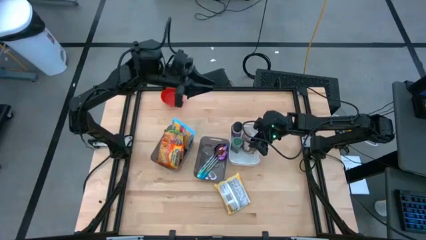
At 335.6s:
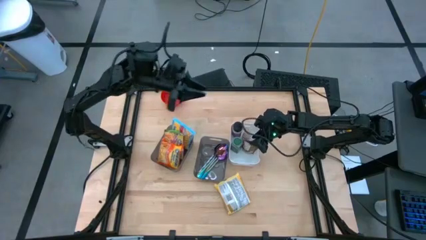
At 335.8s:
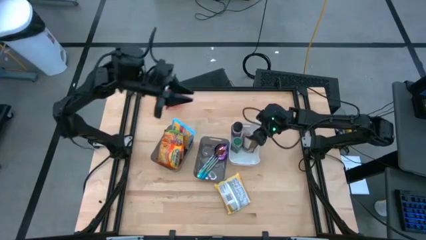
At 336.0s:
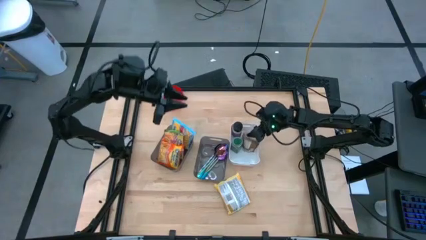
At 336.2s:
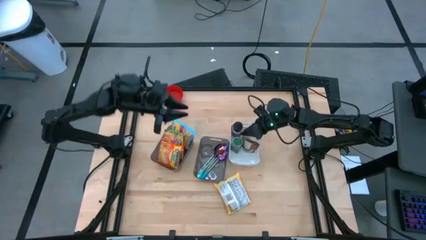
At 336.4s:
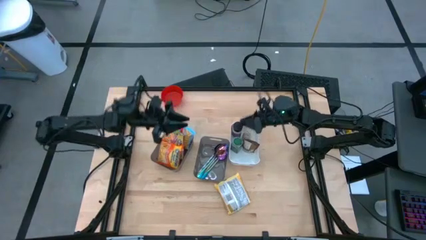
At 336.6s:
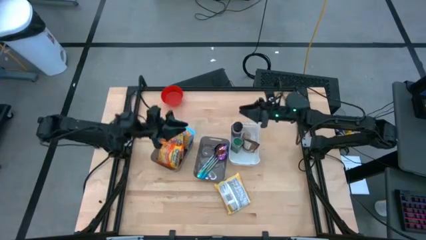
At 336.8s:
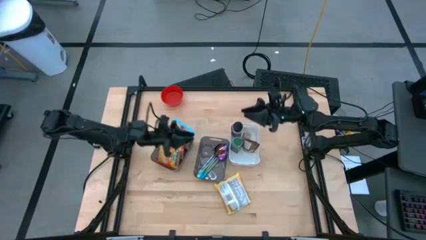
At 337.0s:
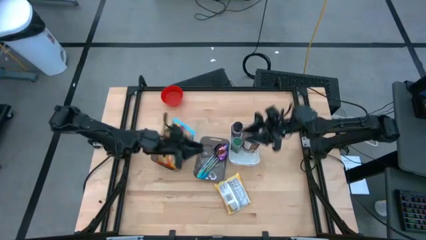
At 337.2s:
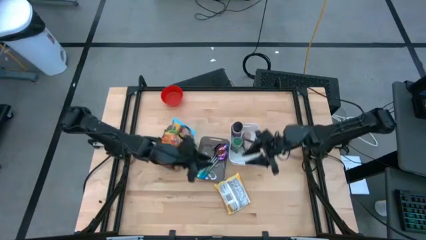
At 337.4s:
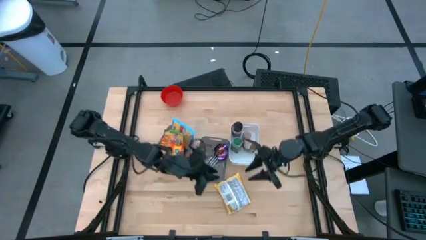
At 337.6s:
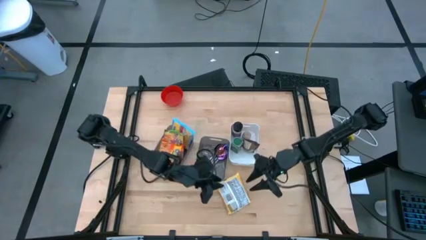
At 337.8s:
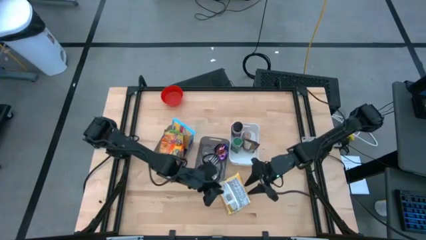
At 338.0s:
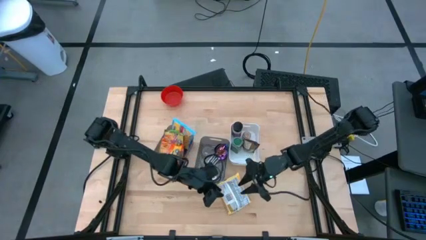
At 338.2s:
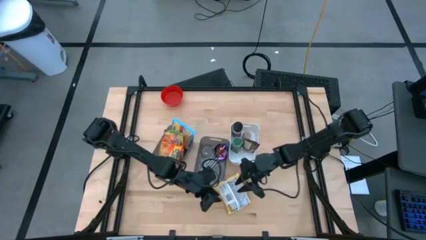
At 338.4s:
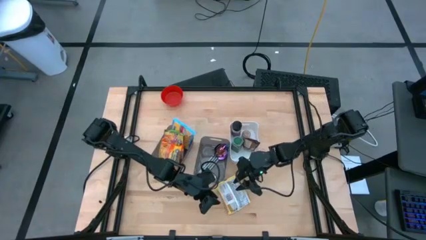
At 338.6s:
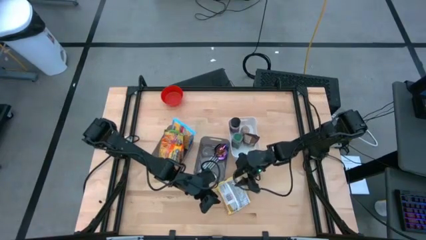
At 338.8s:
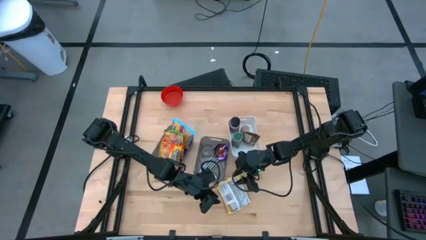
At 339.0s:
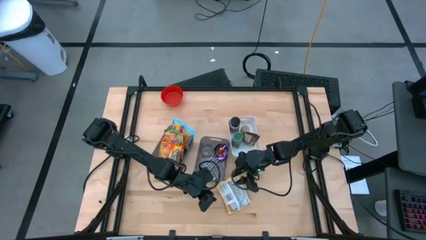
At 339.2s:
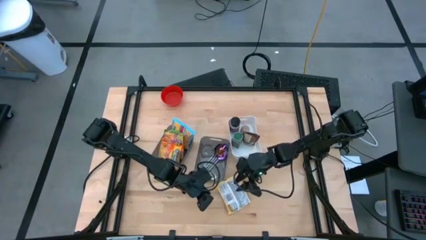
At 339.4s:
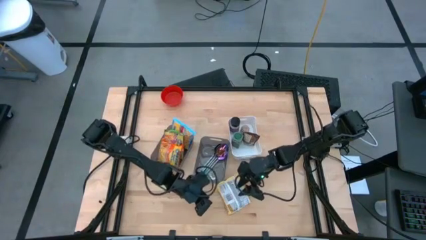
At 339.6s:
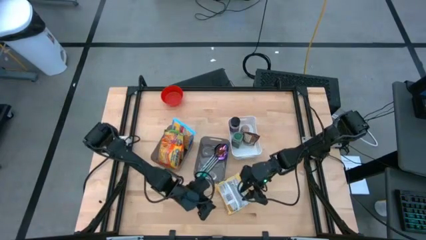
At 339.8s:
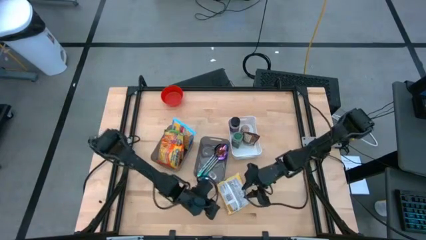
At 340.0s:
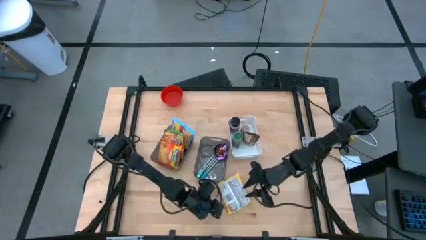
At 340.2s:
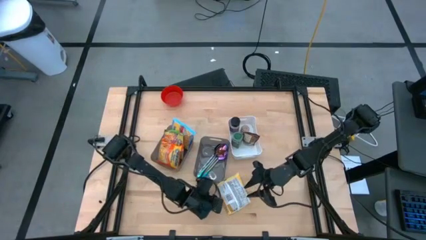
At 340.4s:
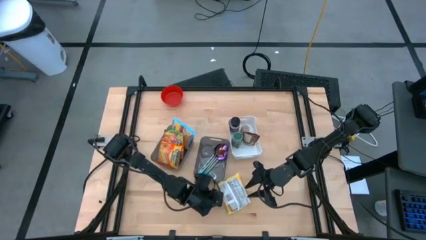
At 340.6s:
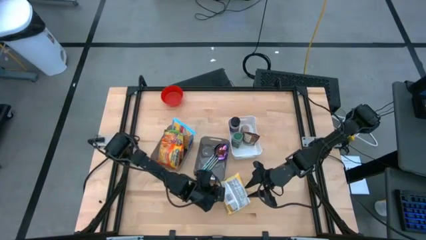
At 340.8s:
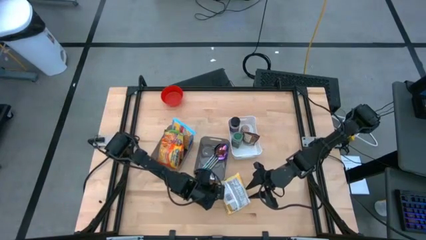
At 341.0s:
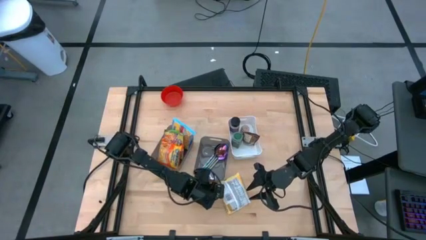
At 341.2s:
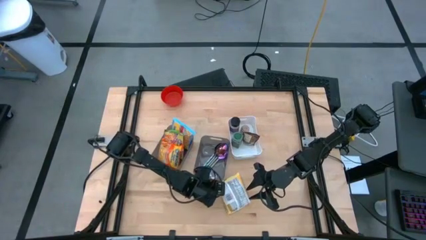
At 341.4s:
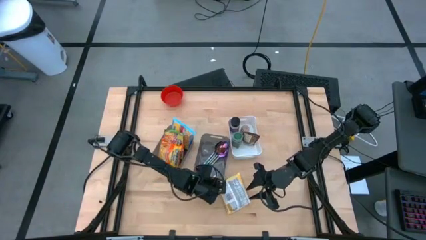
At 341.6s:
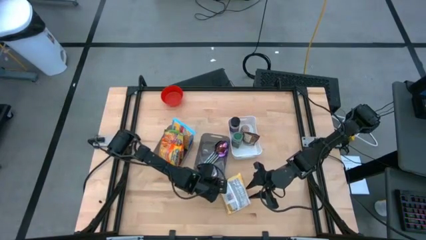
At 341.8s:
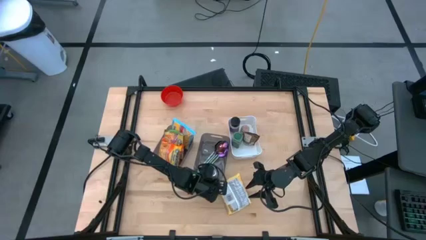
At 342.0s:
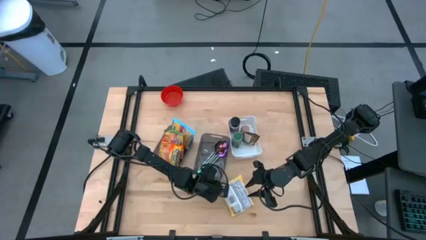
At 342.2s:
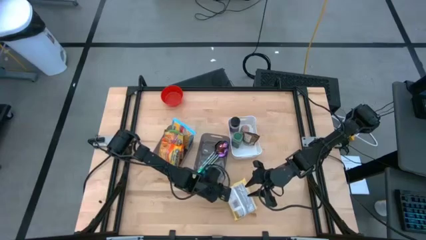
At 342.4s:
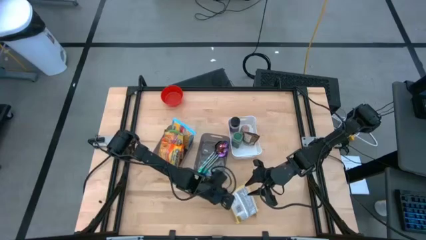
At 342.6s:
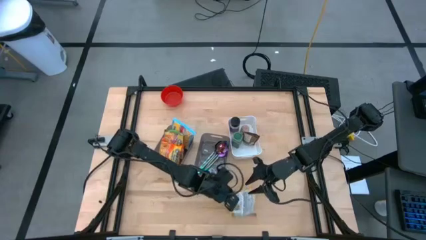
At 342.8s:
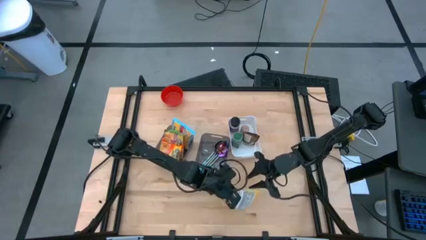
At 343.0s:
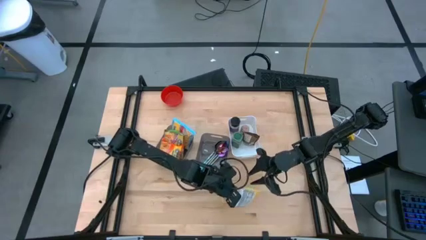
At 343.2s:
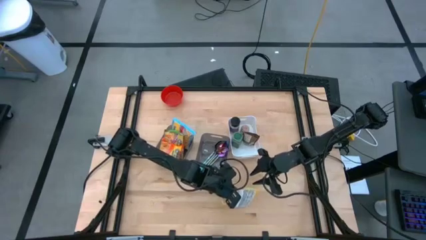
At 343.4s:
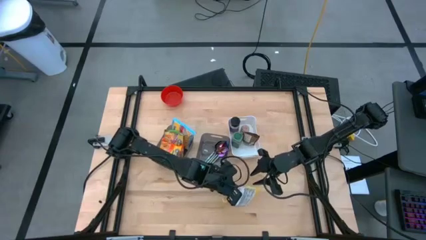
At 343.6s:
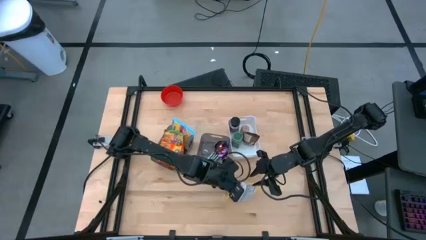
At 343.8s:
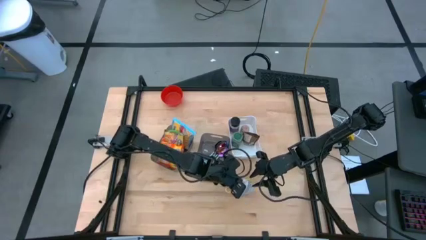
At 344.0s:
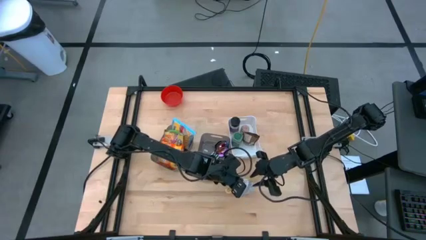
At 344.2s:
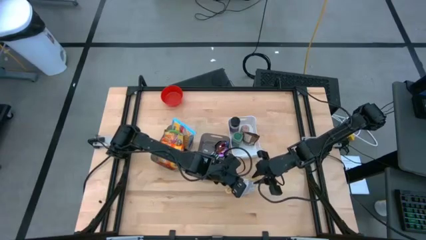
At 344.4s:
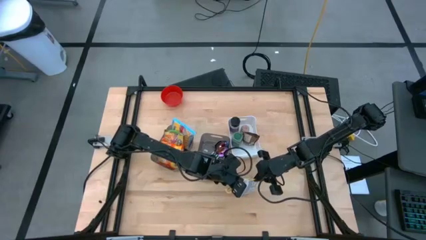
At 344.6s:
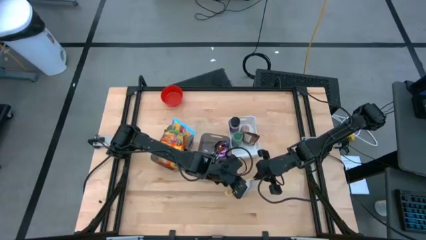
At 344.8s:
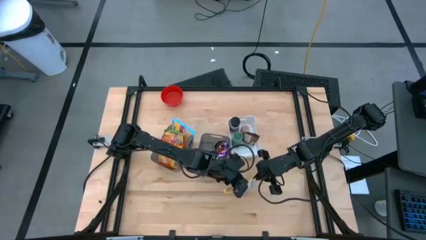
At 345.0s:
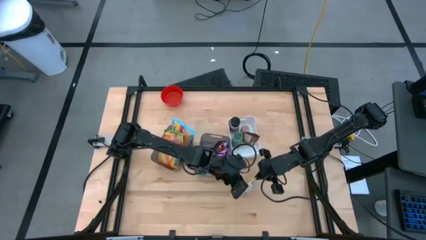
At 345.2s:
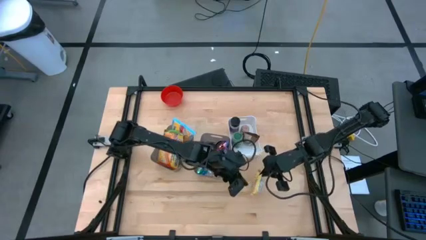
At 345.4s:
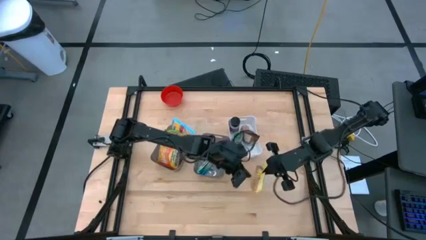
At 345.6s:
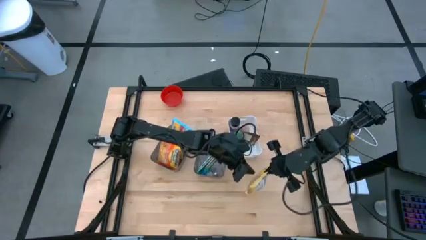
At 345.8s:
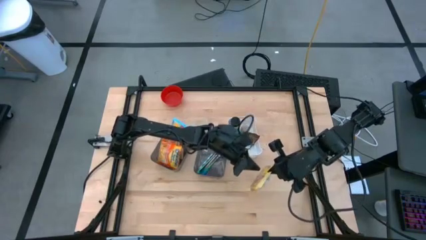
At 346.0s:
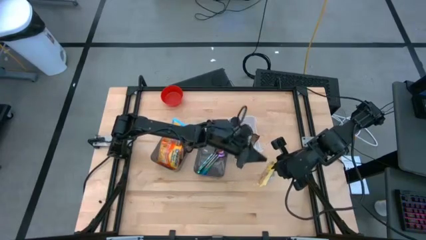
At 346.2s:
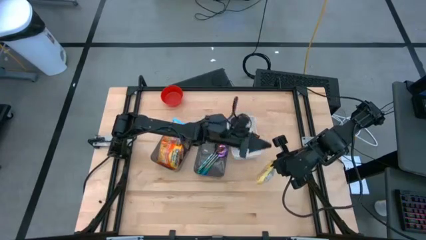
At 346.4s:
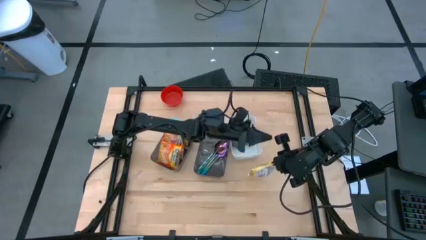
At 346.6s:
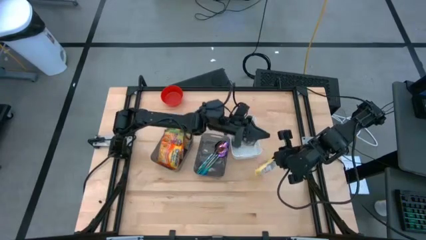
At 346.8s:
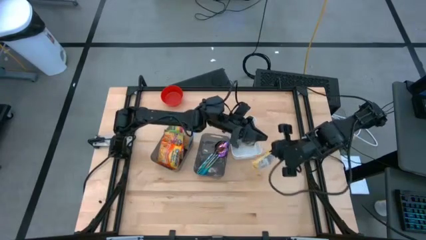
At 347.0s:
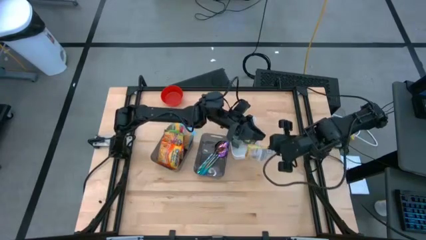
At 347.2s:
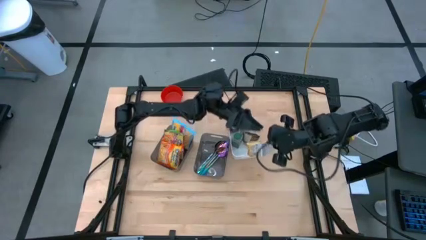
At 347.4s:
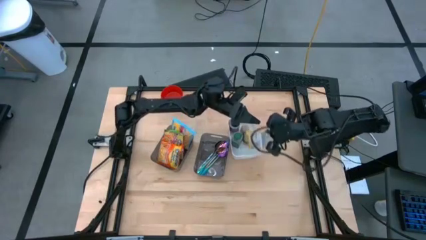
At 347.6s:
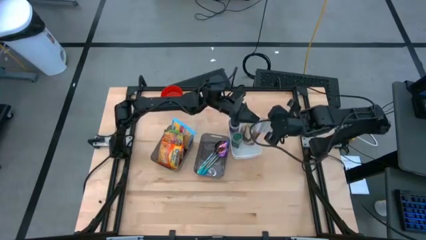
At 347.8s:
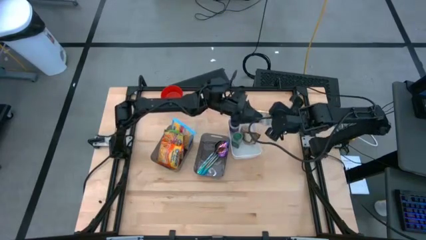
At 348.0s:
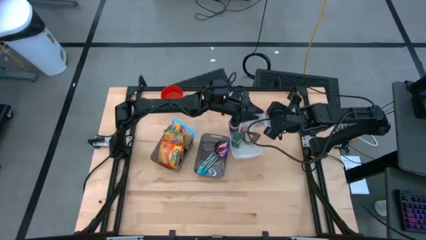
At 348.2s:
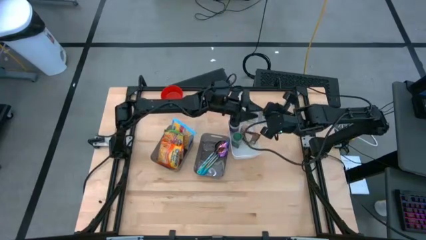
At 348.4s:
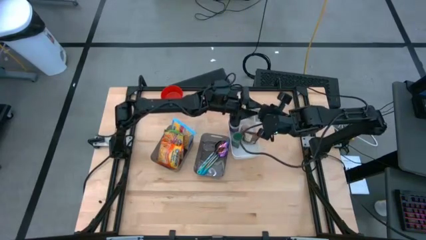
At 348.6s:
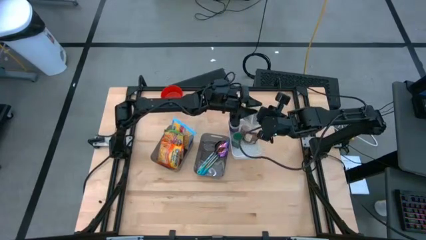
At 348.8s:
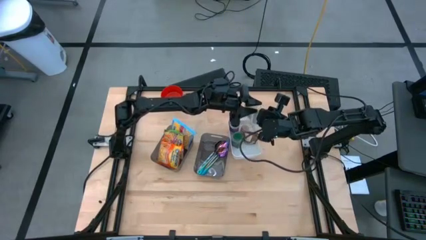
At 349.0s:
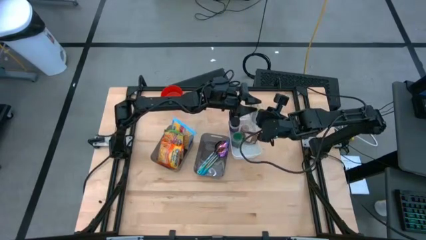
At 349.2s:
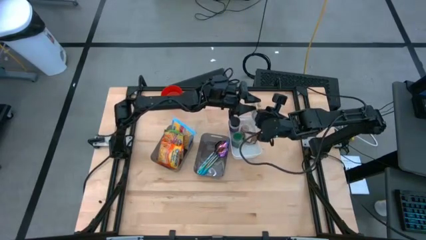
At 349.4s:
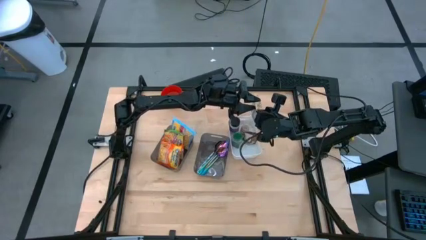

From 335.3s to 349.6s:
Task: Pick & Place Food Item
Put the yellow pack into the left gray bin

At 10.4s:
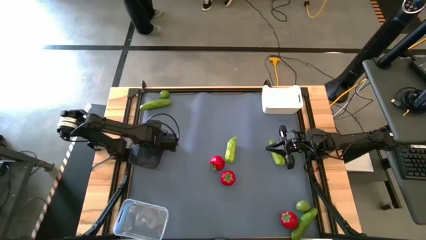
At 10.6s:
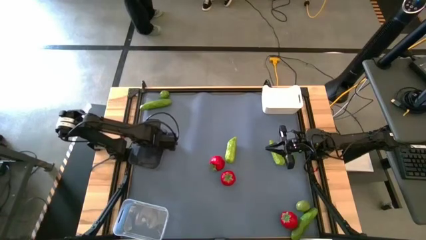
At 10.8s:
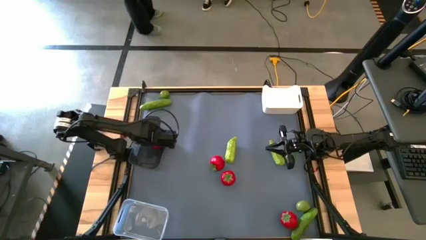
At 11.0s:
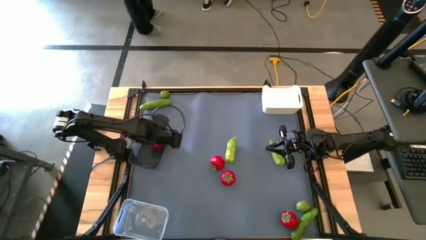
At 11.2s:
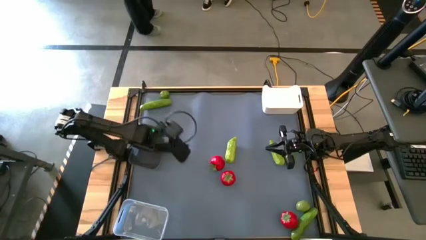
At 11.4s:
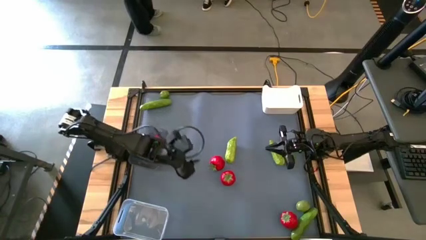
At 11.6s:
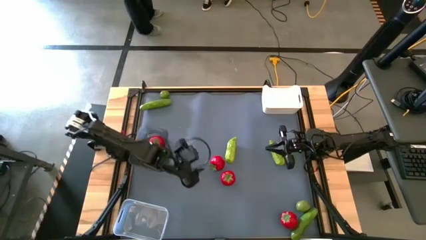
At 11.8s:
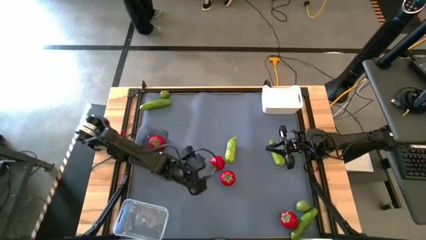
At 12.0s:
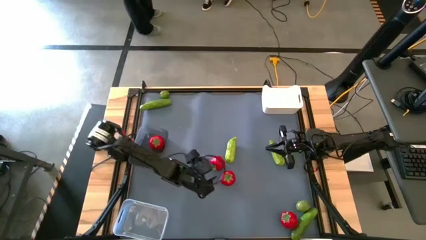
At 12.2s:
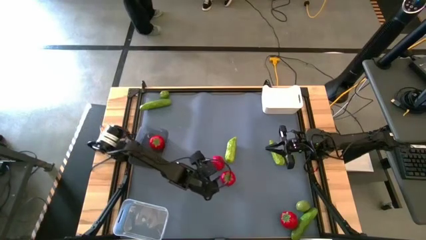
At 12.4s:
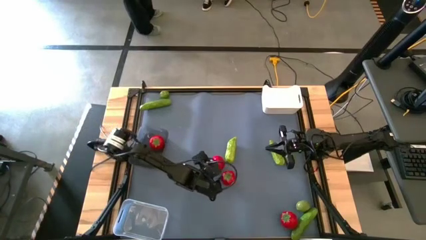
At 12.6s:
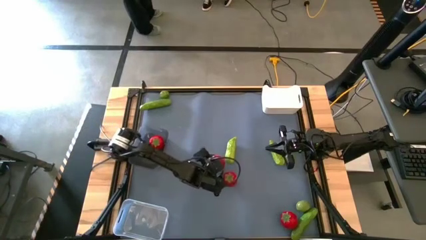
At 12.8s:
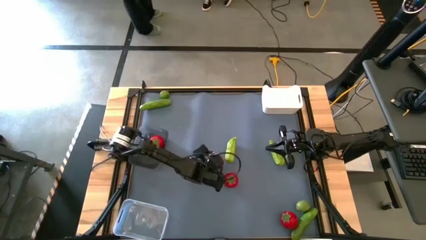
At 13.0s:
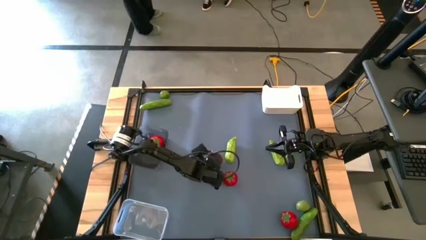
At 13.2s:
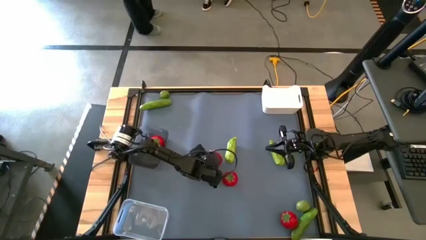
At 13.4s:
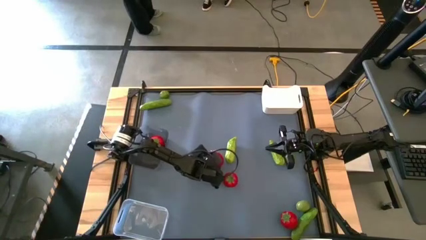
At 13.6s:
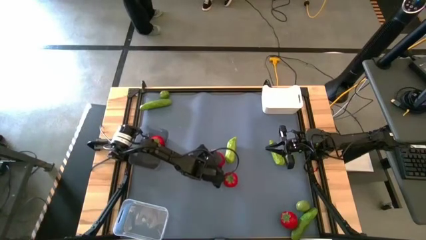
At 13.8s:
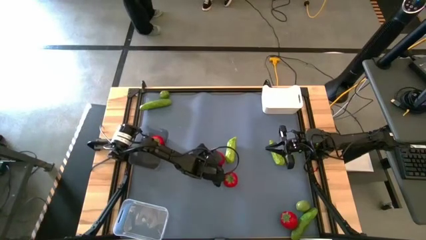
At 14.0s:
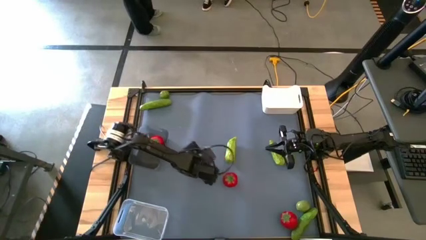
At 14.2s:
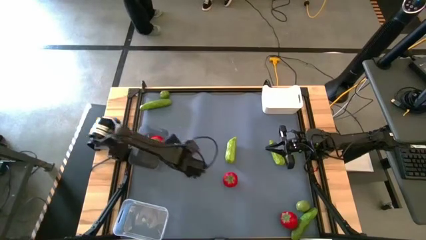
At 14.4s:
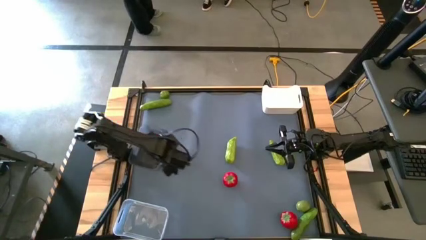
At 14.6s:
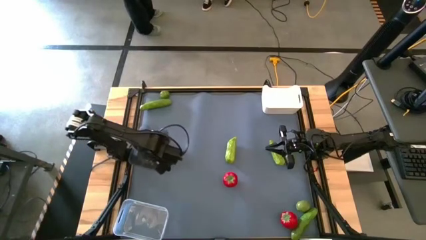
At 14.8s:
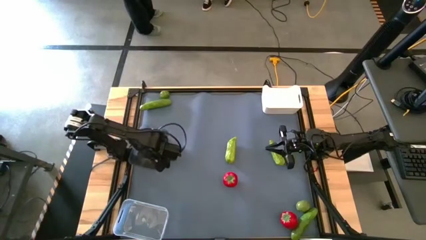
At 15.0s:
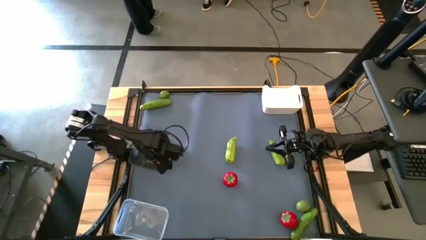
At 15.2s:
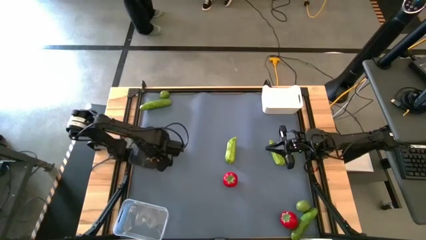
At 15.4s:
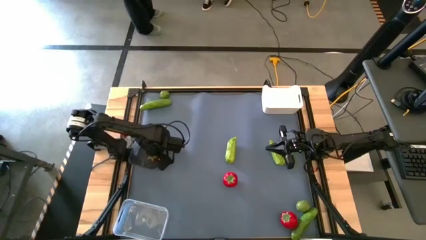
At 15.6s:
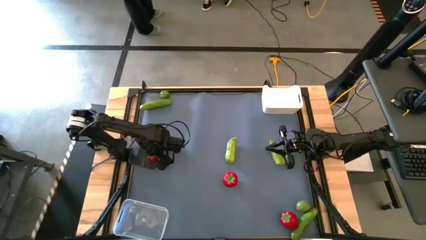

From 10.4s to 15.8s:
Task: Sort produce into baskets
Put the top left tomato into the black transparent bin
